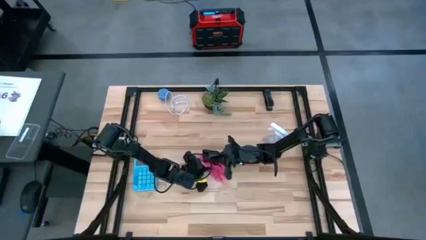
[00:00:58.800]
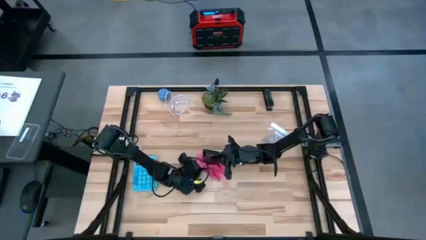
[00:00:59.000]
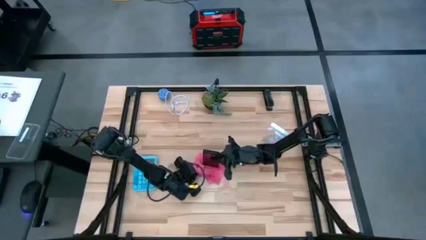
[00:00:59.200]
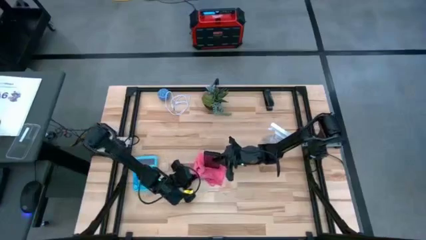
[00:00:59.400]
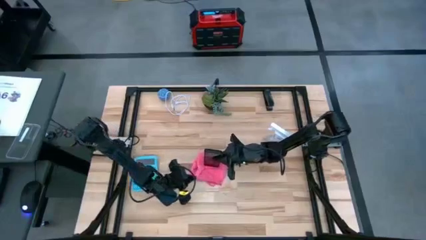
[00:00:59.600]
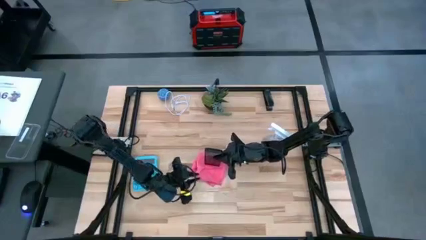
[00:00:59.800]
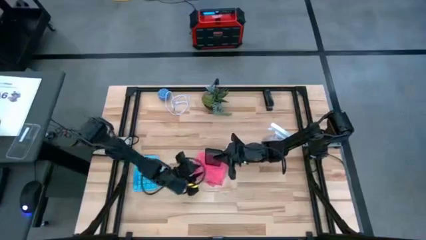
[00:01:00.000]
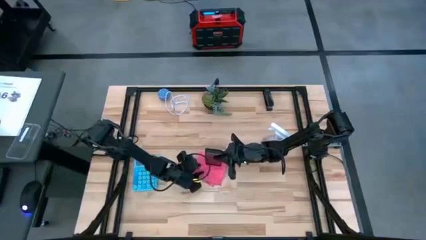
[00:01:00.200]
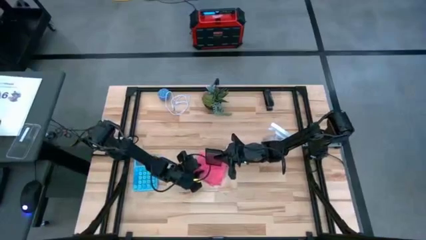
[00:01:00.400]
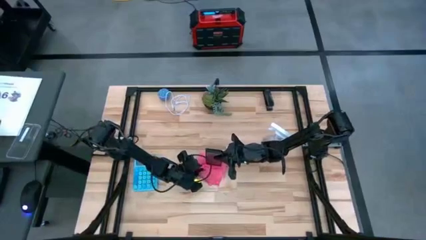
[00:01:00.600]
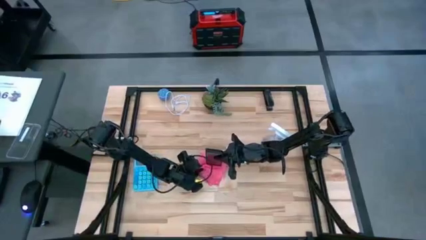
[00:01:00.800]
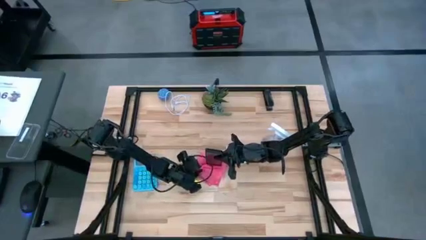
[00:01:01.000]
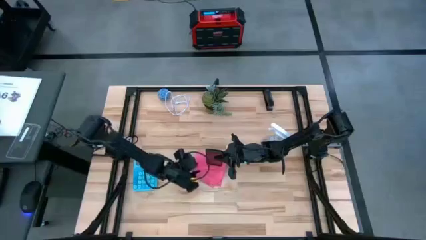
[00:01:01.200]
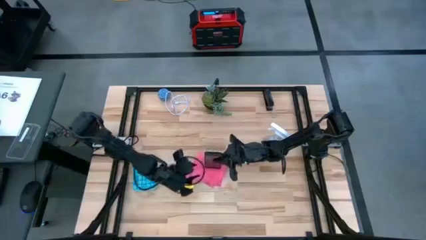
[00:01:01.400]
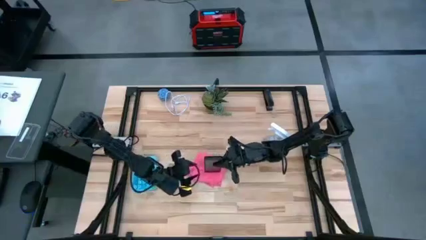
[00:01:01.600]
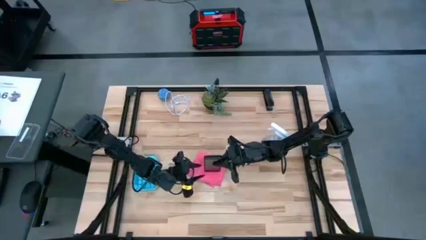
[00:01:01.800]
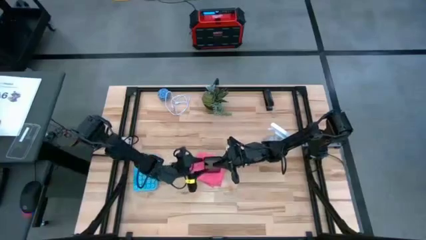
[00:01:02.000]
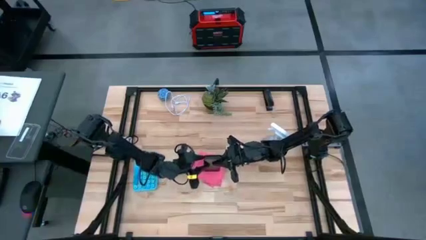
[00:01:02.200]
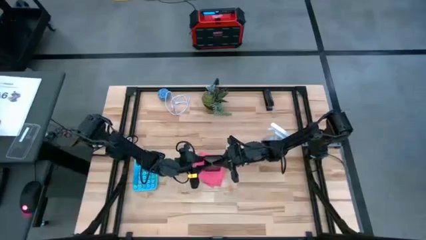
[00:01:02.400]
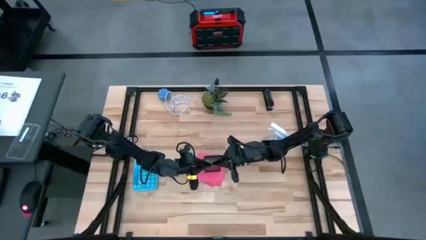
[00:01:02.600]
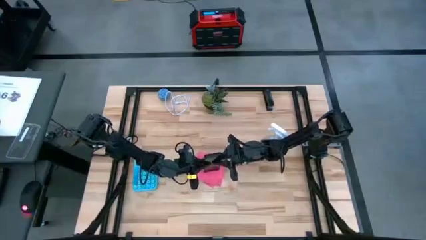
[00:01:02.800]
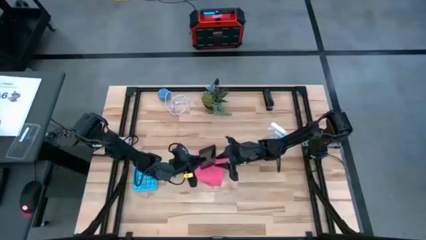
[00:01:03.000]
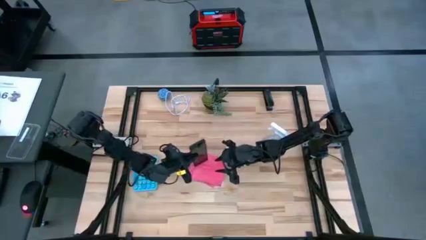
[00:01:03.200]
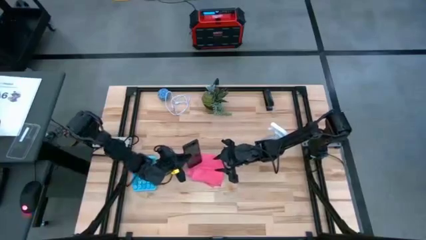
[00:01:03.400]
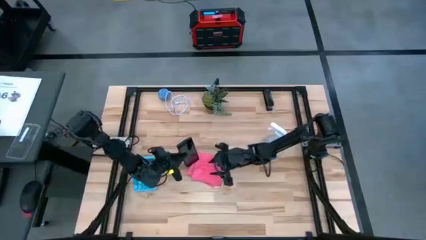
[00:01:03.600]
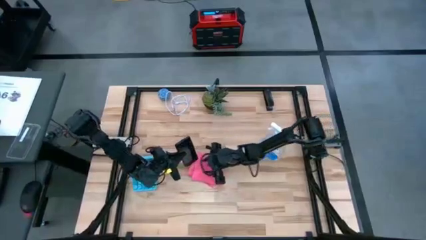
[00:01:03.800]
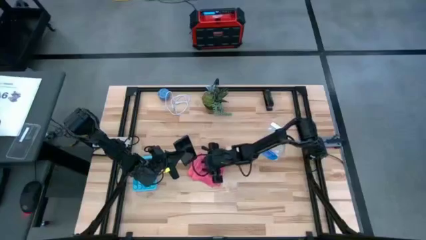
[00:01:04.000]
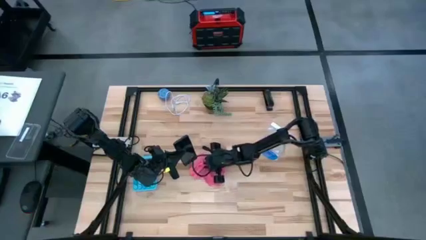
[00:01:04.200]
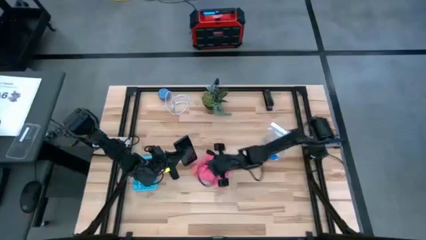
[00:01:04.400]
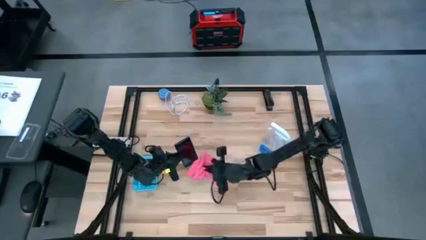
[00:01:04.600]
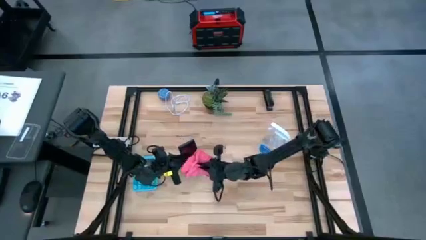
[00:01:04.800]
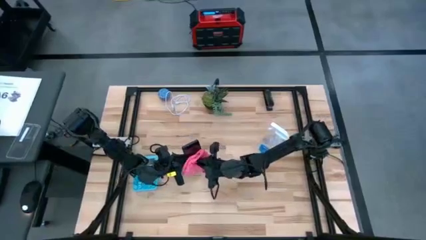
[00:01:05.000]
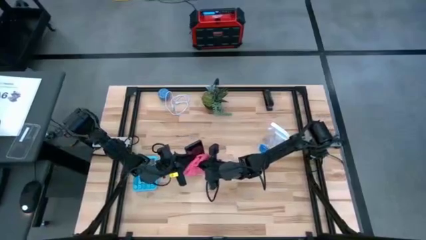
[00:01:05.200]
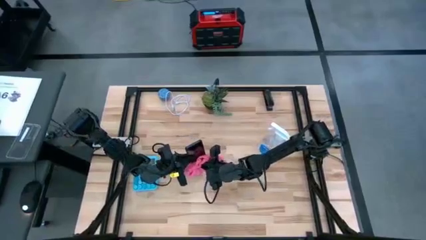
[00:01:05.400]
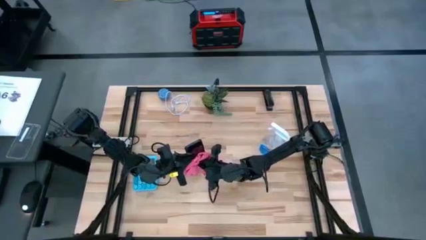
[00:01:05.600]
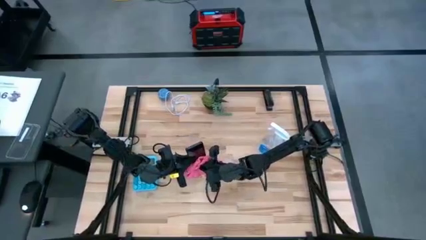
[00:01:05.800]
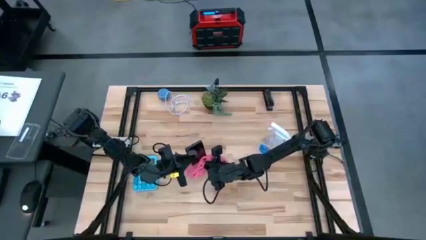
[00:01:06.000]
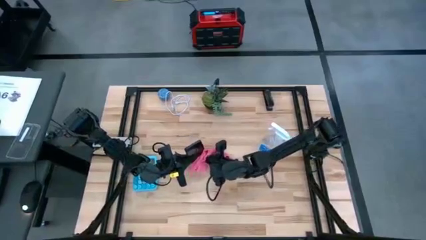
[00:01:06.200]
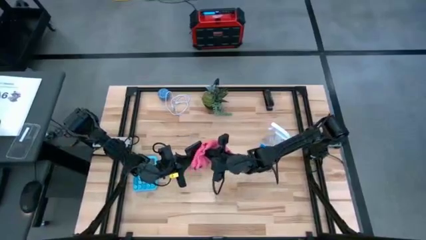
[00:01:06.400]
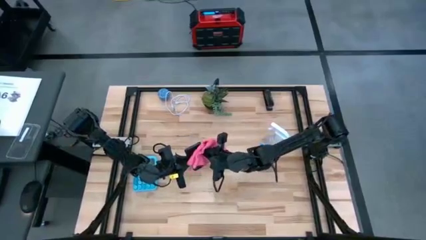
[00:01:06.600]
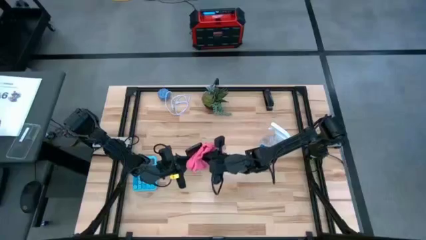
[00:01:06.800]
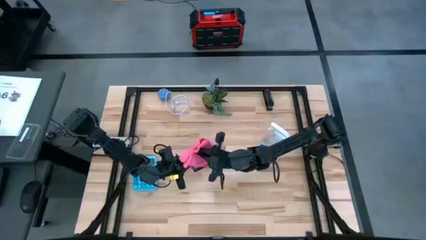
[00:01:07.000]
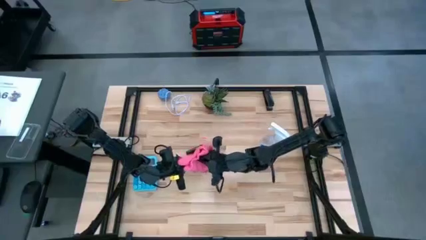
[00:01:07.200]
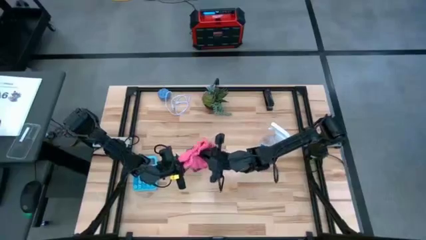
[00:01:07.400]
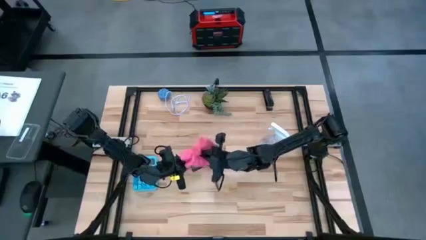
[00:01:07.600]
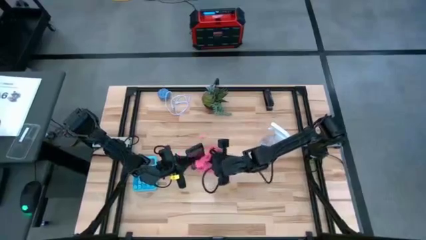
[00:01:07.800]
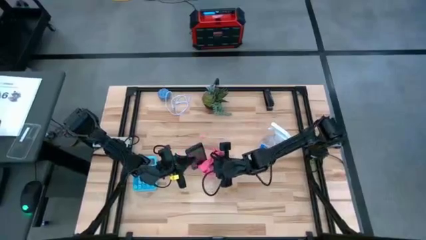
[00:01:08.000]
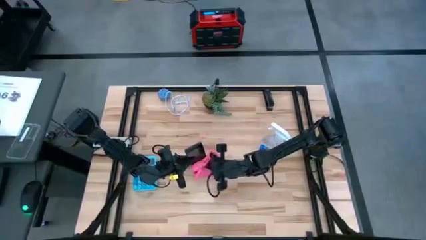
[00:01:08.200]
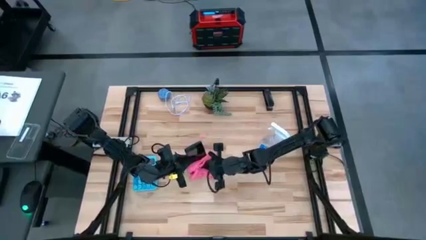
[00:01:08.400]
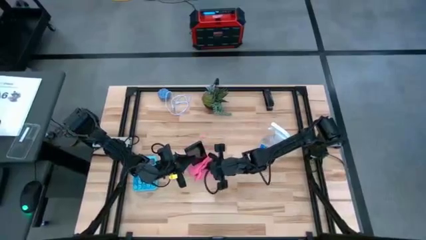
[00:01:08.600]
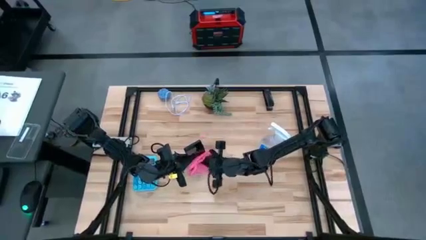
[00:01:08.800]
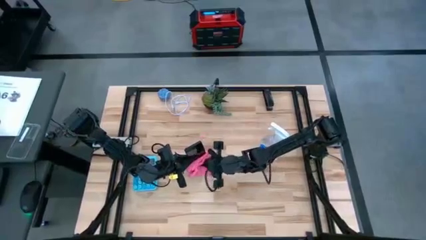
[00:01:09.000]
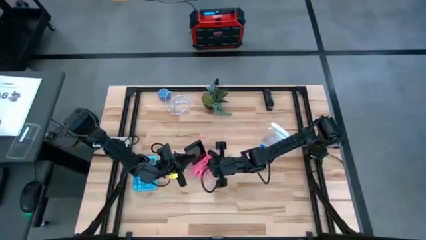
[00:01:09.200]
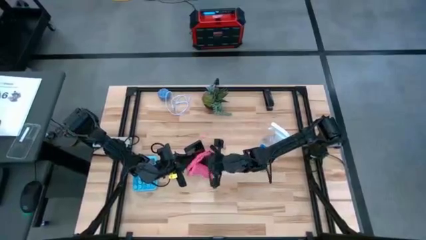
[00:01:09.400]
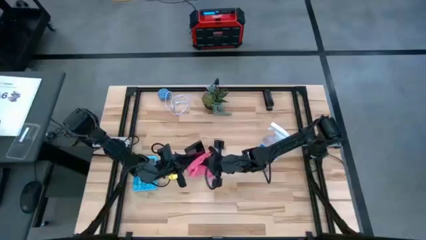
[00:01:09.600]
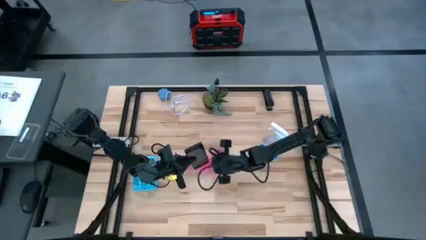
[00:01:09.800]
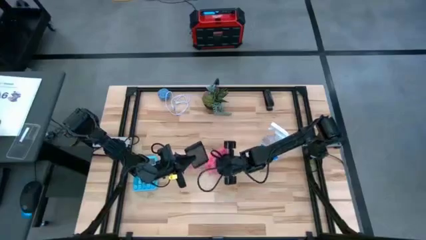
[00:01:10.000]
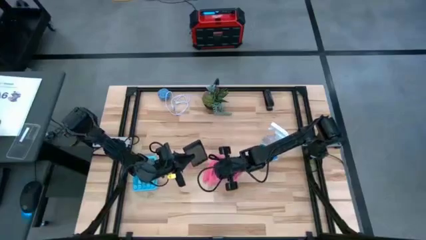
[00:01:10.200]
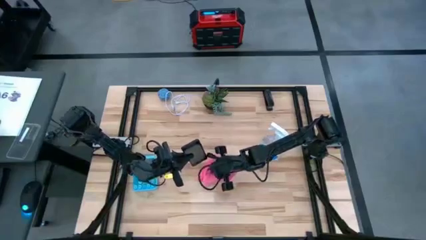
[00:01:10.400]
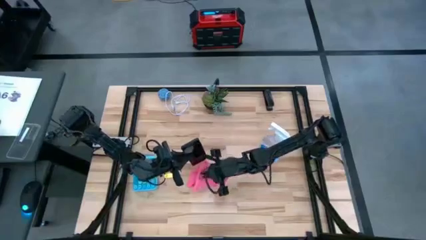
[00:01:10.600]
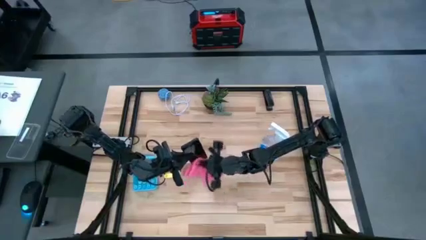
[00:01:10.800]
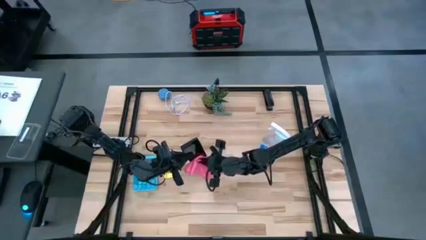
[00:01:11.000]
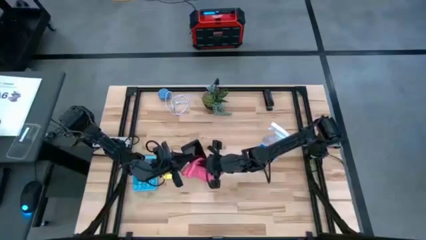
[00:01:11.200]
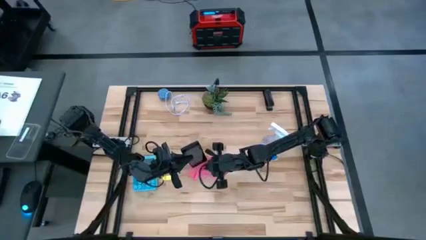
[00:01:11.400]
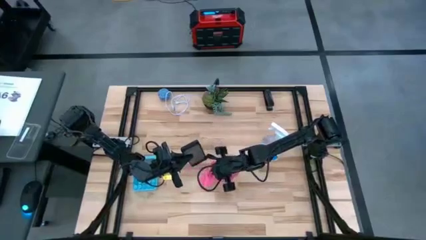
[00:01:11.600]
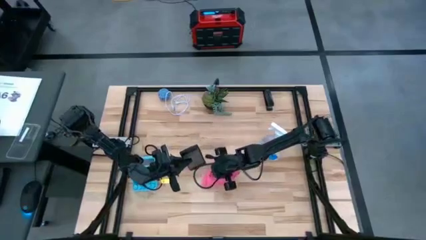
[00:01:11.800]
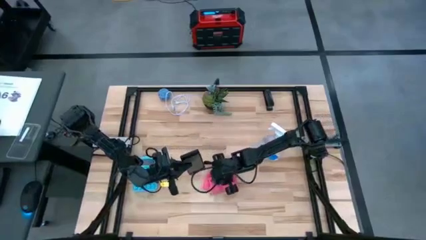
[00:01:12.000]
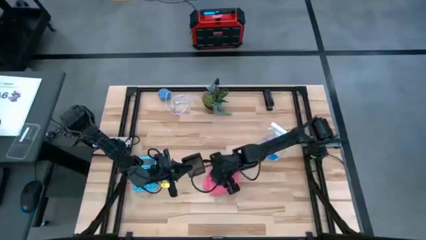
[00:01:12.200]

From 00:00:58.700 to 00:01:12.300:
Task: Apply microfiber cloth
Wipe the front of the cellphone with a microfiber cloth

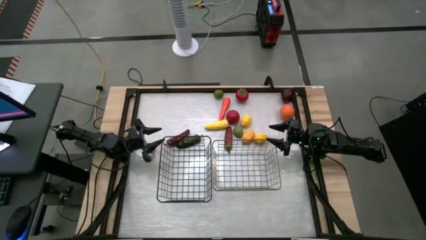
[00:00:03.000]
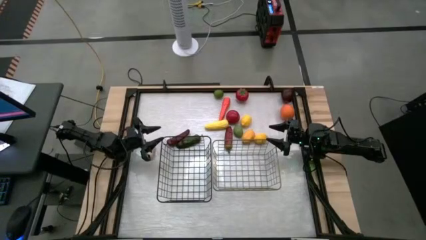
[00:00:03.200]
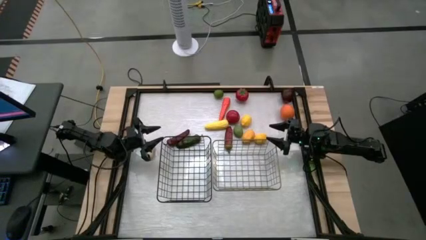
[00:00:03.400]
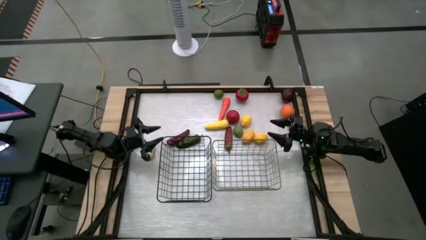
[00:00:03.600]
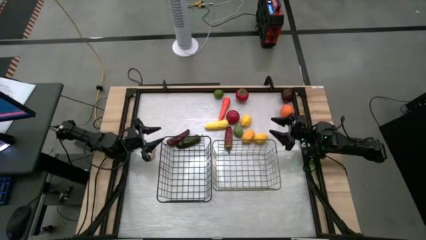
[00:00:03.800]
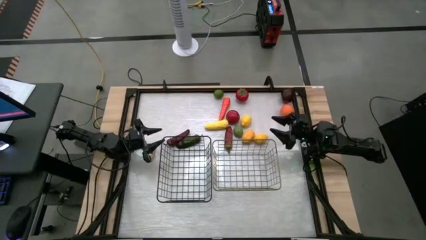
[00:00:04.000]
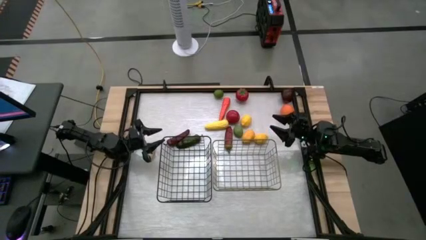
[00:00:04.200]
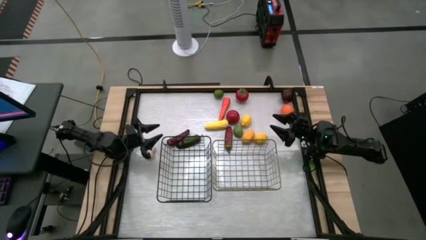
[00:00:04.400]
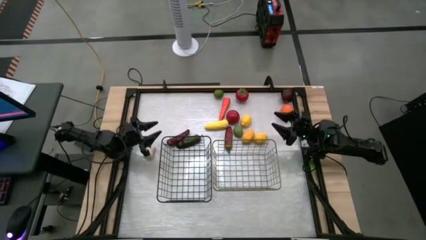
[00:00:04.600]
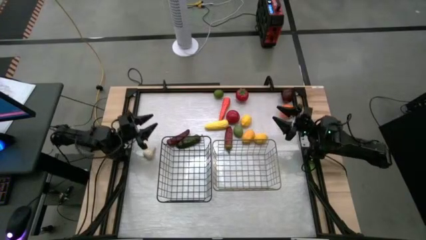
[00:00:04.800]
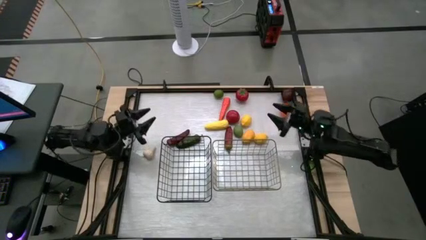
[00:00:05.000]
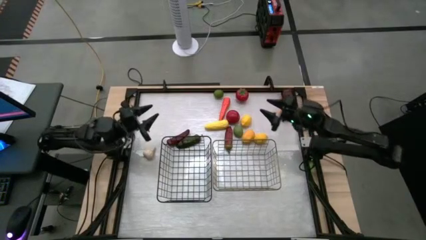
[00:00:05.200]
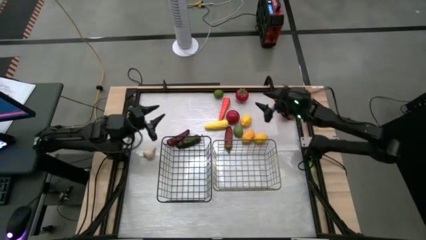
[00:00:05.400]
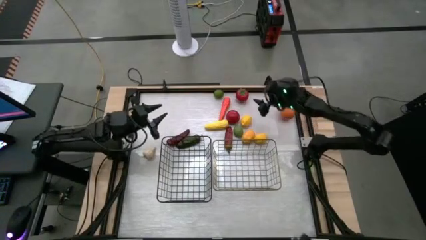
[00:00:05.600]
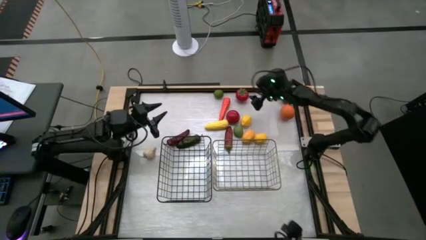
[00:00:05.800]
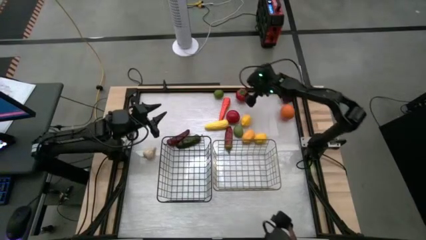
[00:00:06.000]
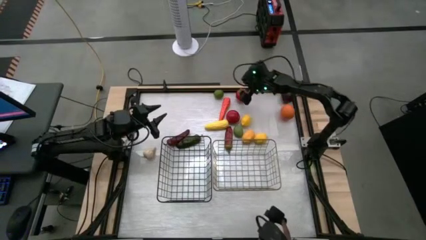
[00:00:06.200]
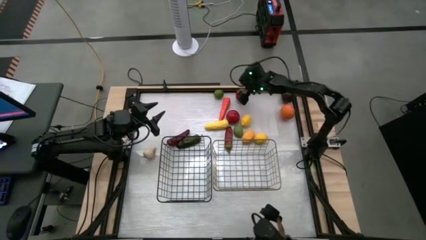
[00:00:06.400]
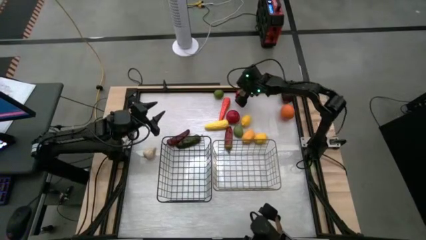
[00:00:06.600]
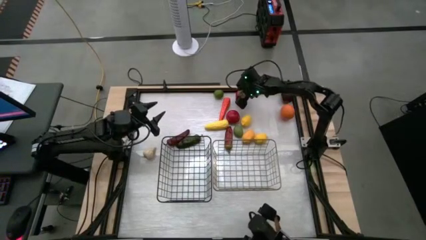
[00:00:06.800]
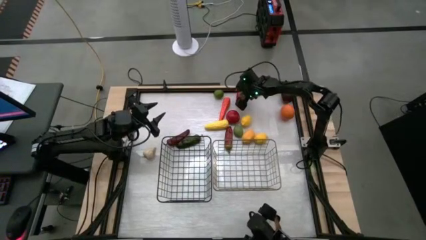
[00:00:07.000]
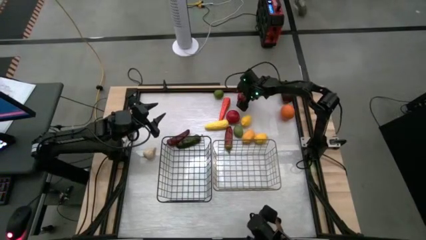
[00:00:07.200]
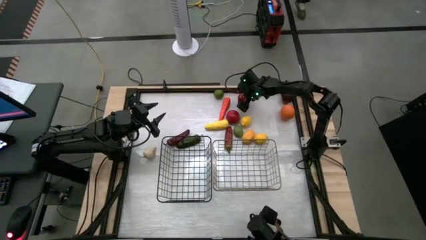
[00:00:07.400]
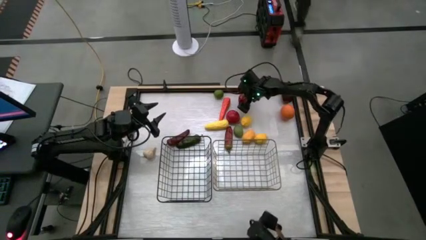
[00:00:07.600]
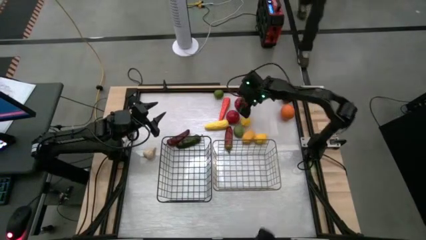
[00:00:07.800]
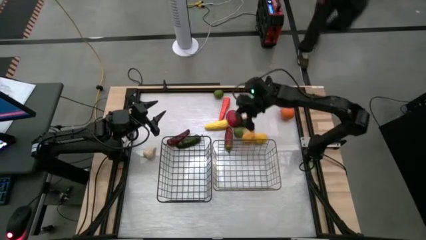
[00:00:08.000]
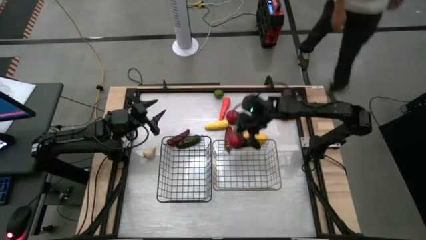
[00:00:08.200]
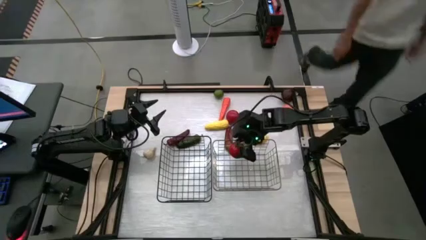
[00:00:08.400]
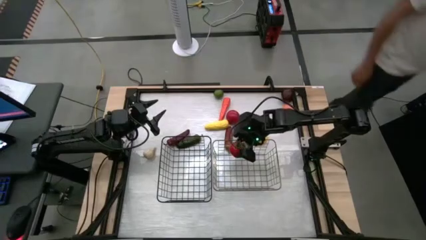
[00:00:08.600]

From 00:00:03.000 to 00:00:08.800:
Task: Sort produce into baskets
Put the top tomato into the right wire basket
